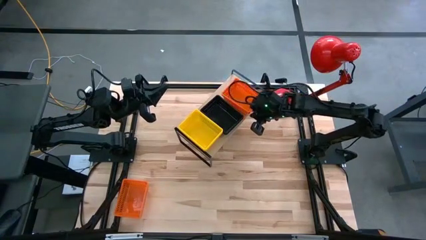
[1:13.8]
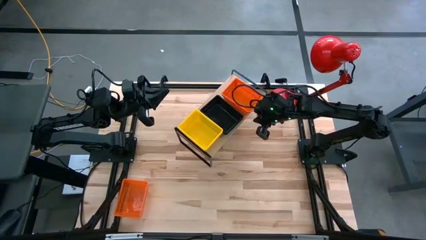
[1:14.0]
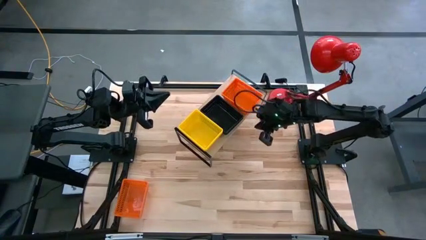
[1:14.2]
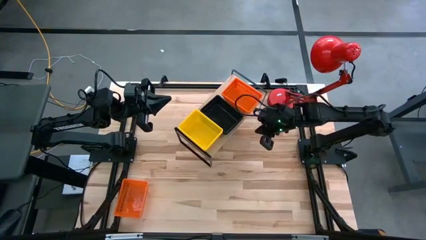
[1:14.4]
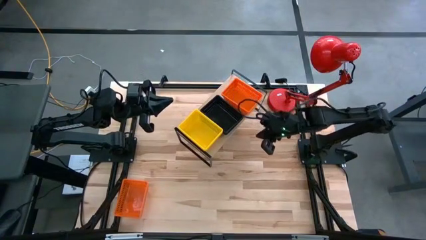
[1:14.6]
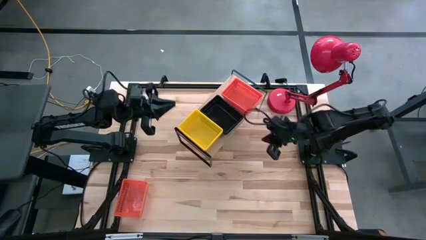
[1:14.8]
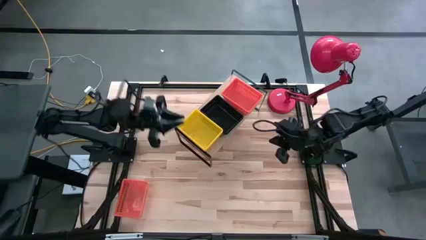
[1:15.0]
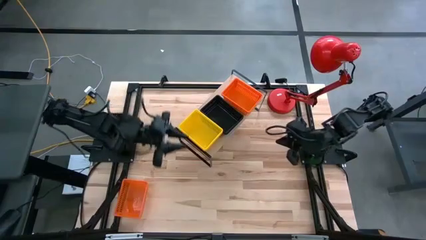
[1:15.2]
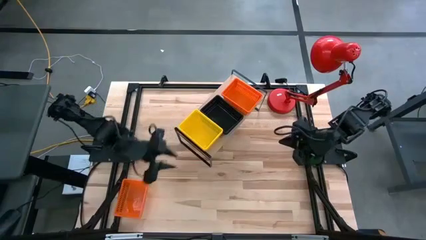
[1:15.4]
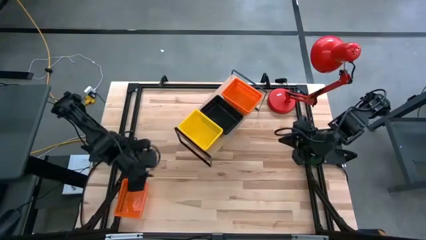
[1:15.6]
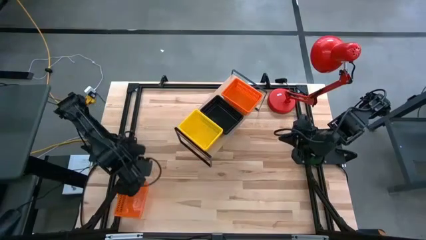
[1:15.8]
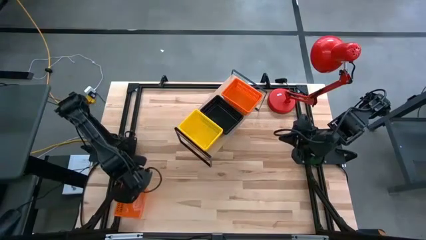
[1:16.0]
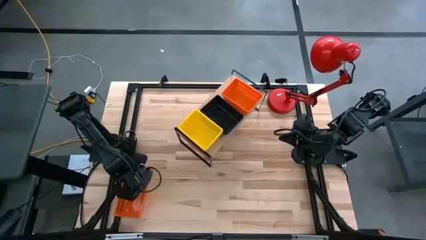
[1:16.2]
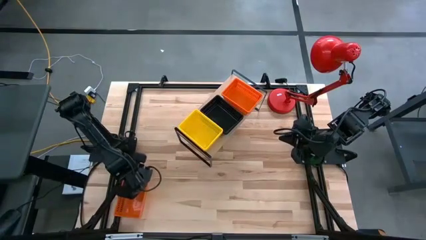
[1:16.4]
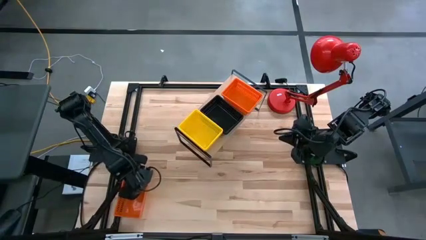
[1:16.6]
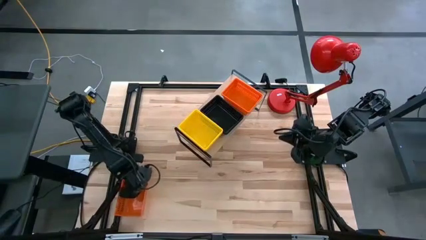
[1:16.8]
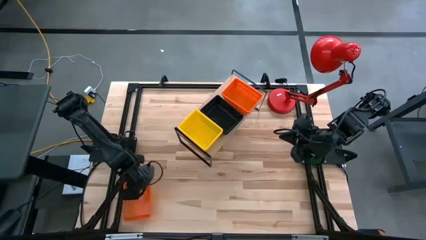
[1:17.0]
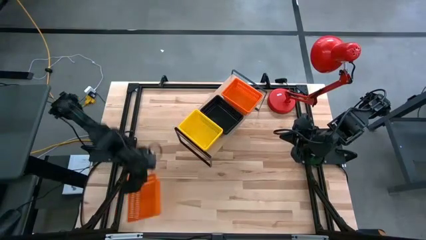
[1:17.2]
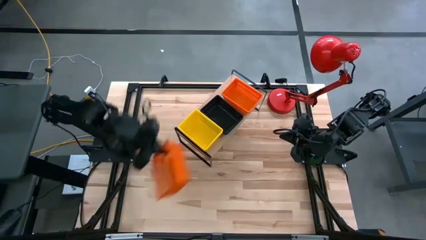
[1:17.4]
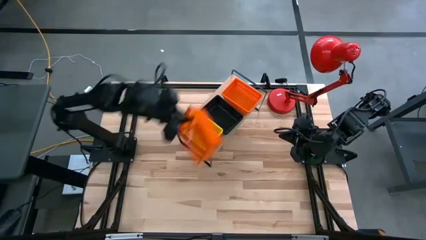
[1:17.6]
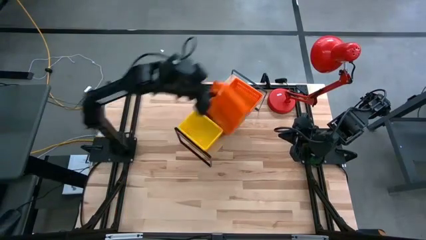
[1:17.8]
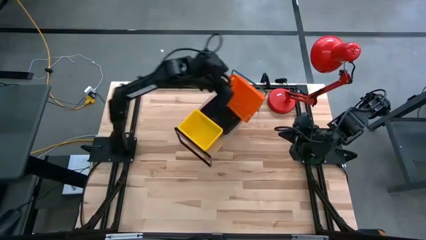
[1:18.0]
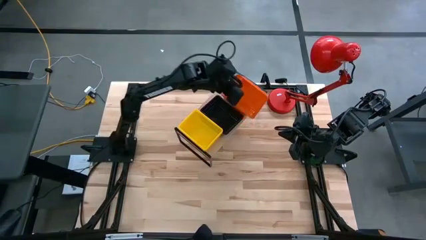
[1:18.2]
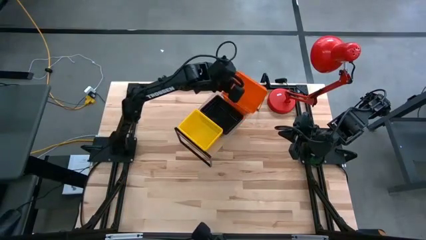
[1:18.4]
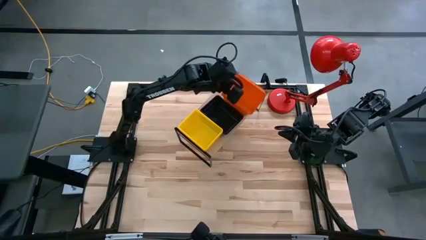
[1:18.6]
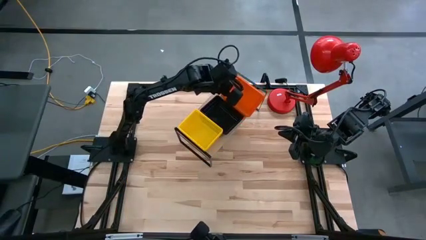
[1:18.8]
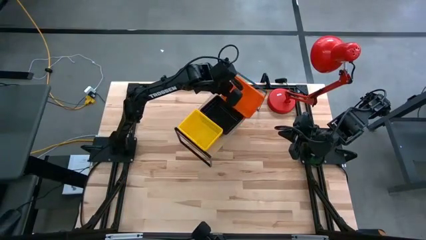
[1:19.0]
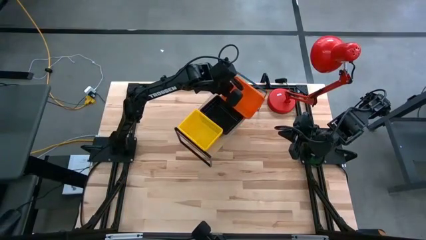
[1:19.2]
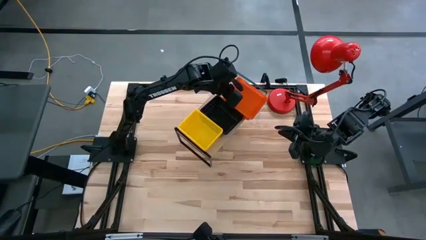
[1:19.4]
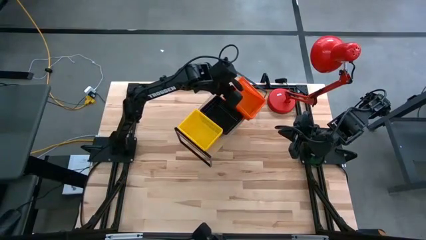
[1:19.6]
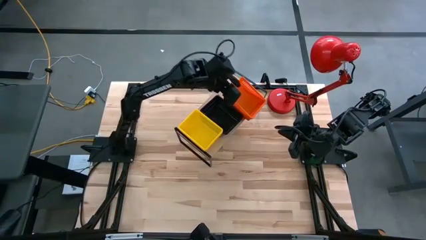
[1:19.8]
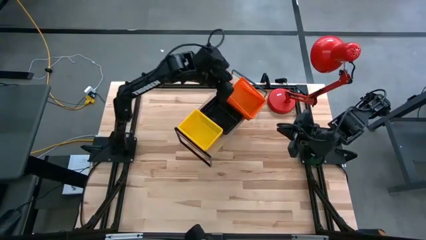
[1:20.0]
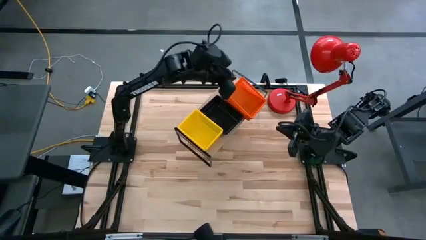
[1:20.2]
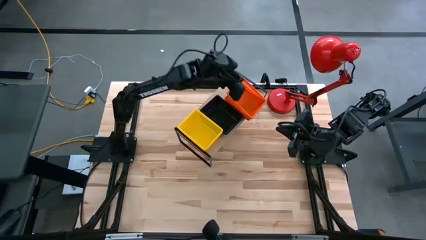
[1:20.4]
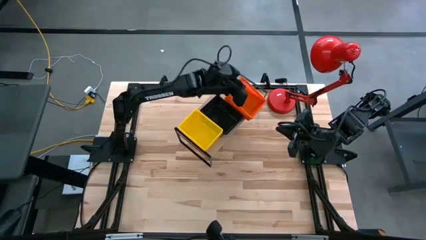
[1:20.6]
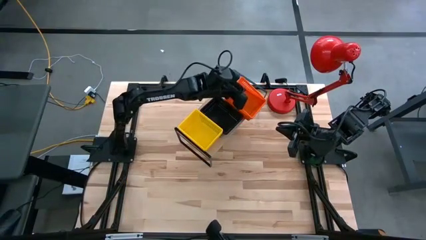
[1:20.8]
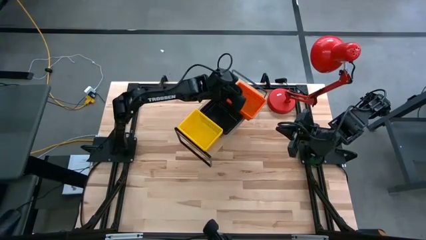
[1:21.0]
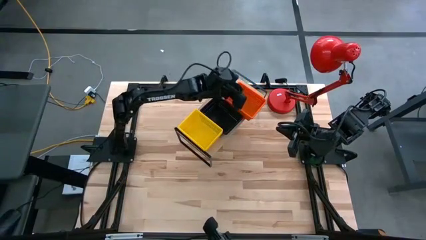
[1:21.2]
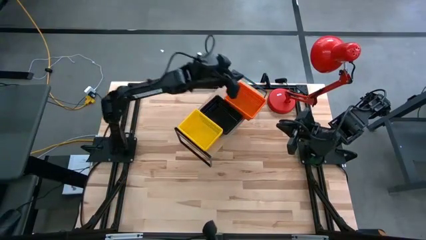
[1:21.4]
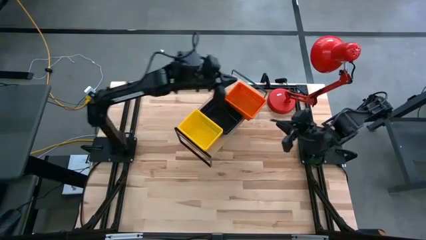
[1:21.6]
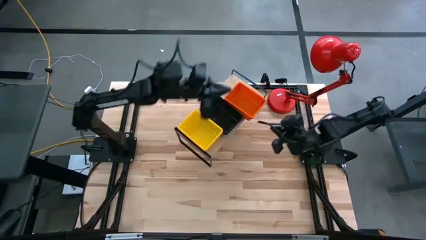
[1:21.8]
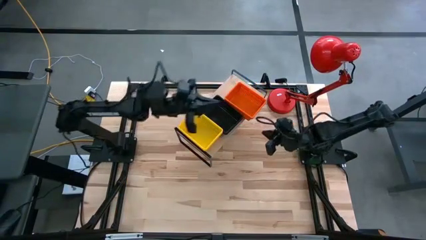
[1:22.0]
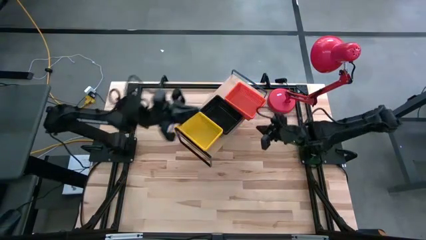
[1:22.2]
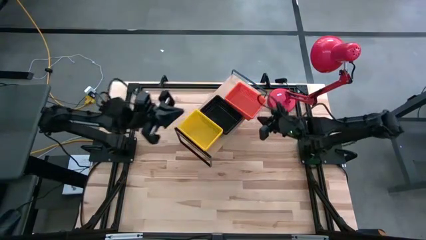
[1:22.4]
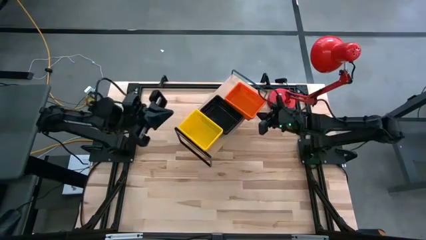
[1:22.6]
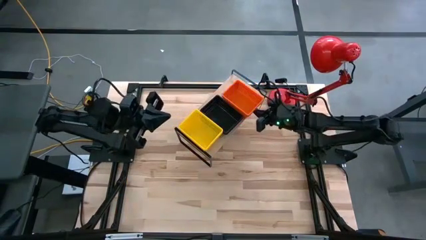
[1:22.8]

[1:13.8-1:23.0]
Task: Stack baskets on shelf by color
Stack the orange bin on top of the orange bin on the shelf

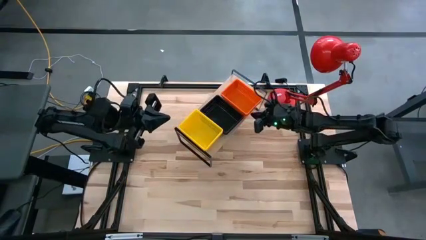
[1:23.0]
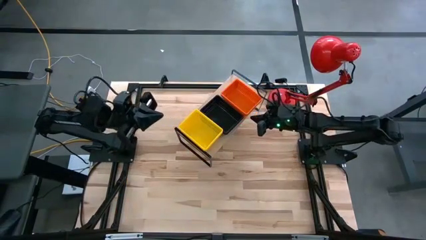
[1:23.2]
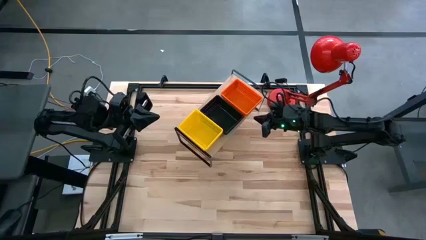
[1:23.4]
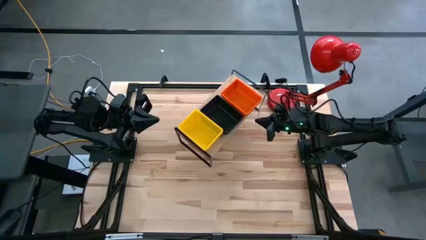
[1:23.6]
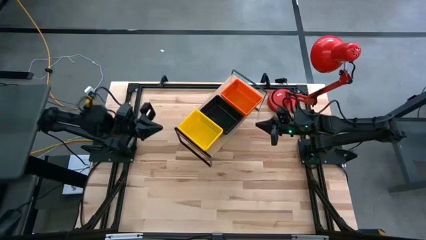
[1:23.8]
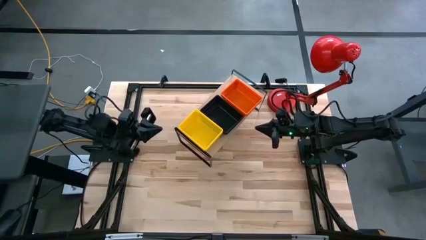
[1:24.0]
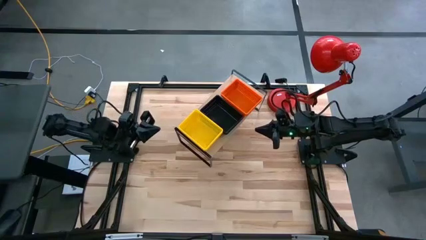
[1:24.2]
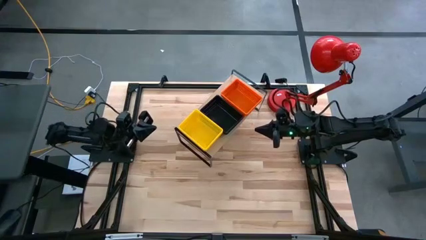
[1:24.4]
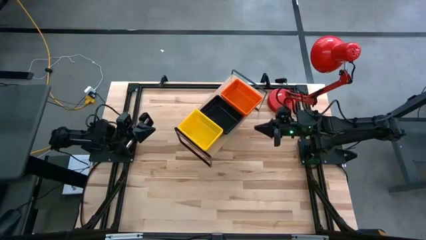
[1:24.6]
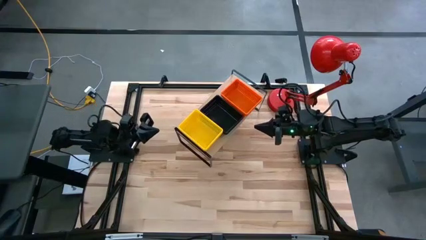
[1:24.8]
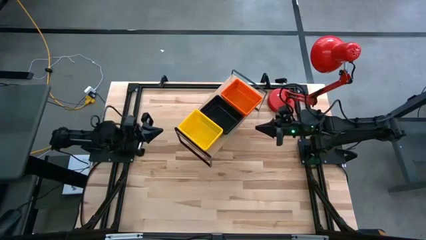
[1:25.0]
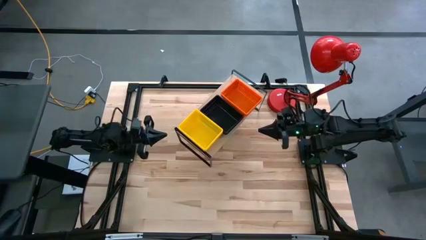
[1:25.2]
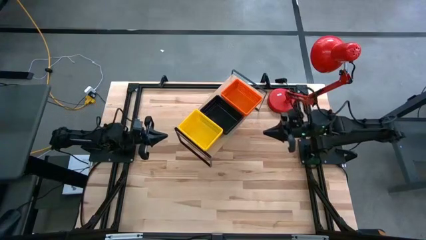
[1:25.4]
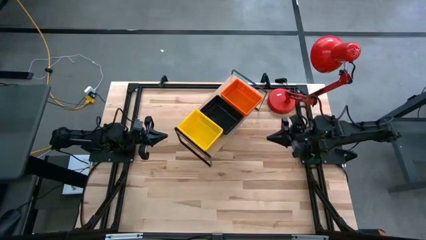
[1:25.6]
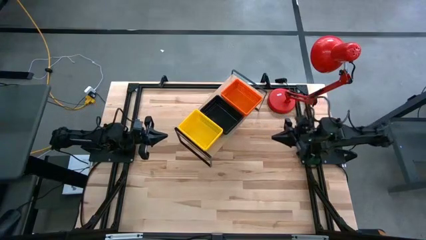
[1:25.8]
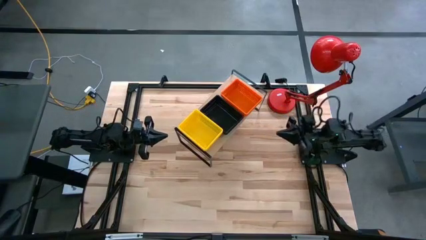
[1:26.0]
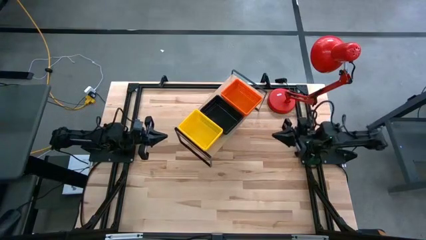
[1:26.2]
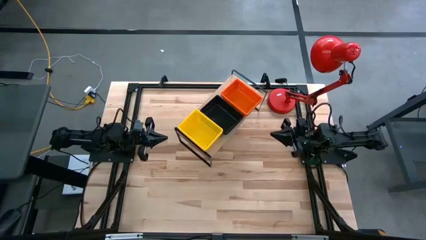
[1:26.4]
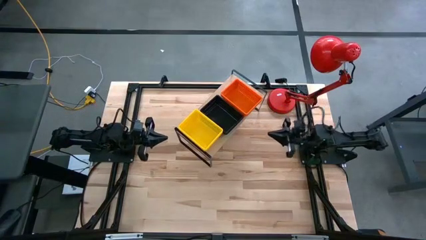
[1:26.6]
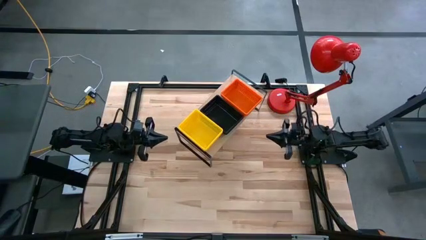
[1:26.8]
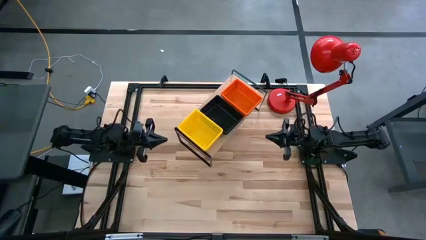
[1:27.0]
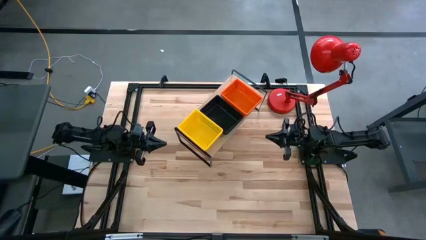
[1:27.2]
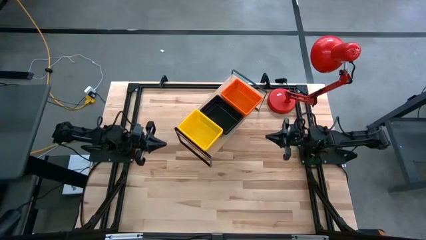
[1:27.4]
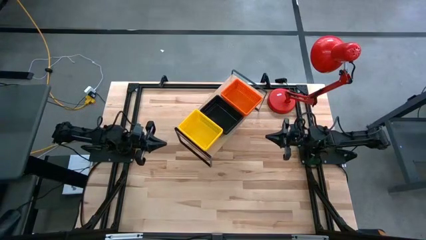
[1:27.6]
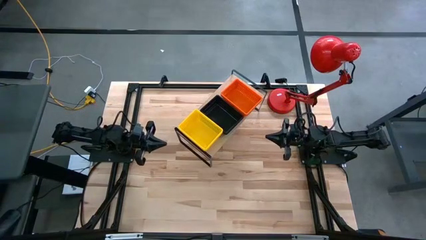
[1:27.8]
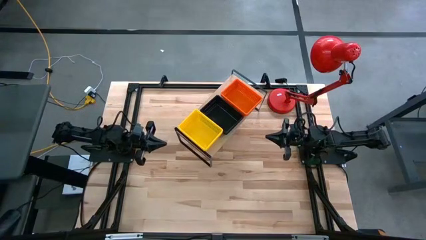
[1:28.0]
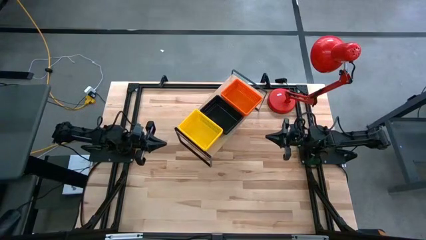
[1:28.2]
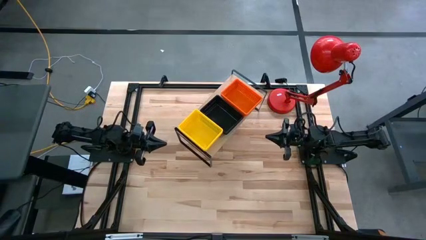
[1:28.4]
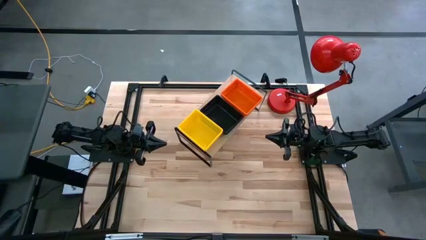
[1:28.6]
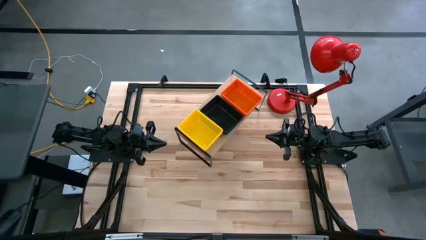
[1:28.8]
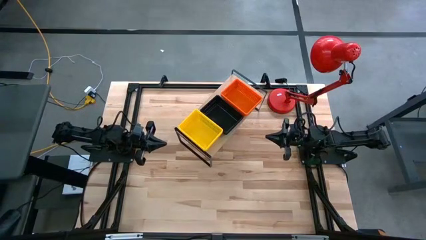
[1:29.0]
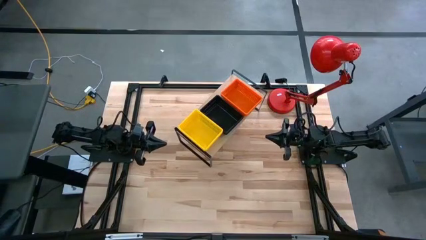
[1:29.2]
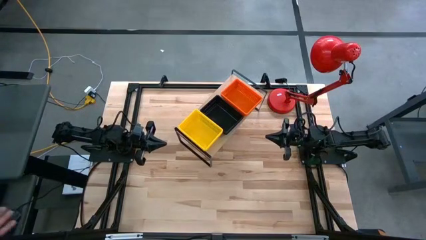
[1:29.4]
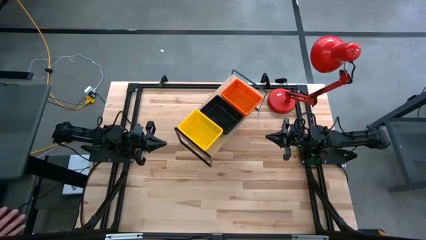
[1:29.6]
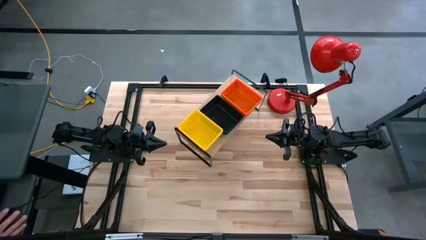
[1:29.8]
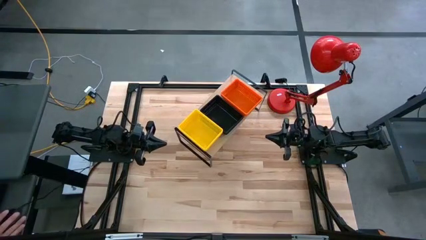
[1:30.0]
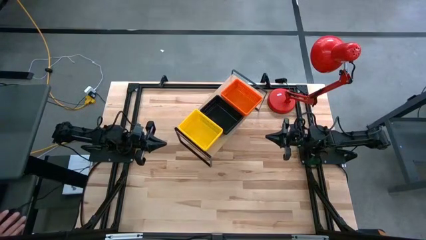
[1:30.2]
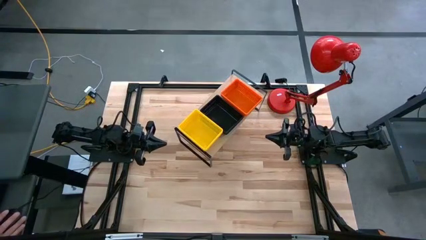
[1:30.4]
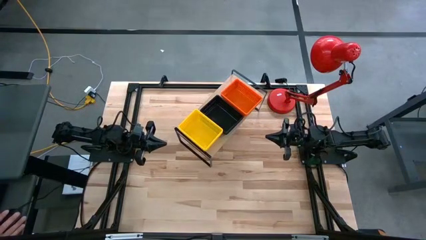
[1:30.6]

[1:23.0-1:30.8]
Return to Home Position

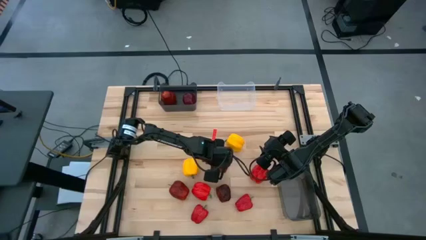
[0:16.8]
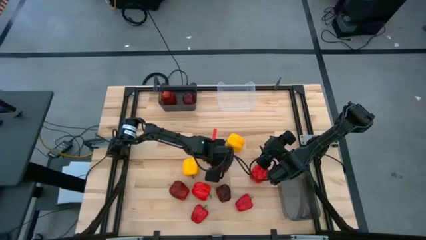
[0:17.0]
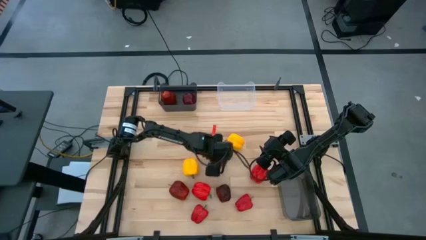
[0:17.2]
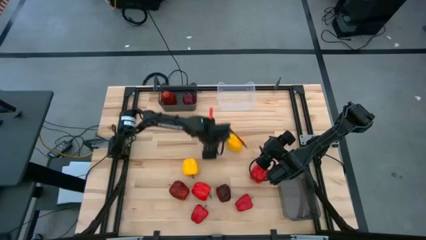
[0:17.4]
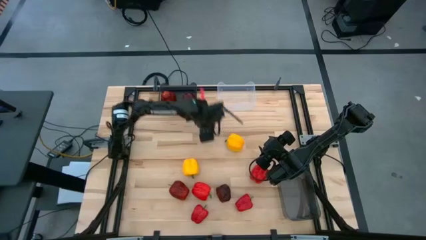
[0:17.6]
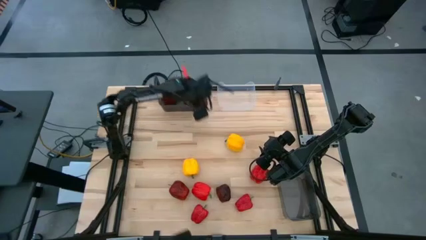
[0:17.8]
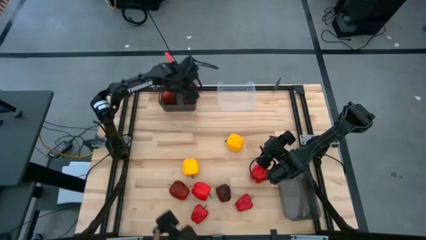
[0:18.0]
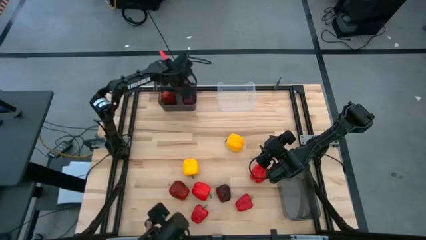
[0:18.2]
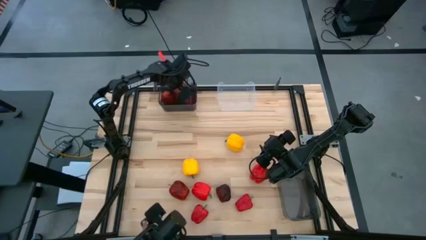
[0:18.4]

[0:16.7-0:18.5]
Task: Sort produce into baskets
Put the red apple into the top black bin
